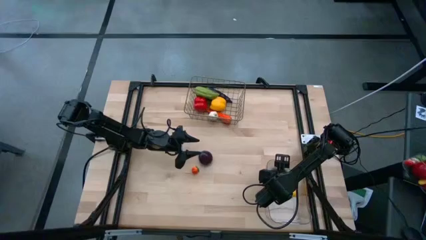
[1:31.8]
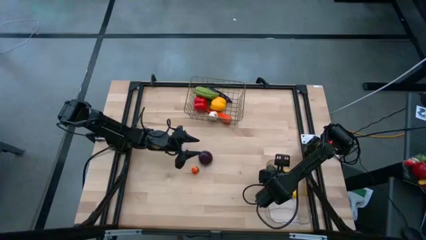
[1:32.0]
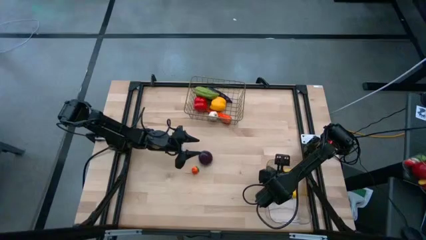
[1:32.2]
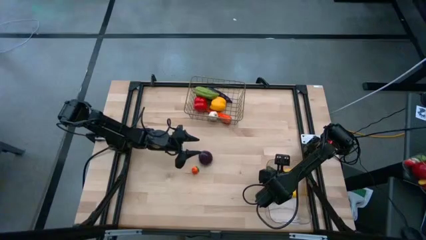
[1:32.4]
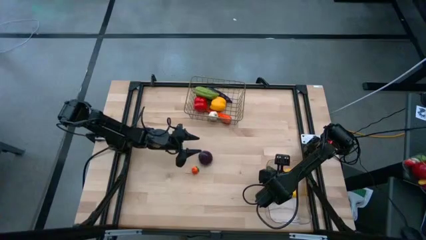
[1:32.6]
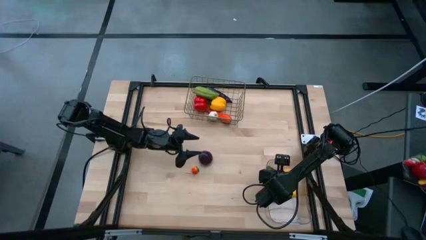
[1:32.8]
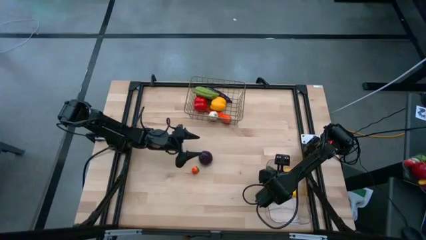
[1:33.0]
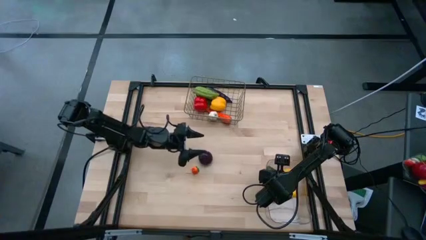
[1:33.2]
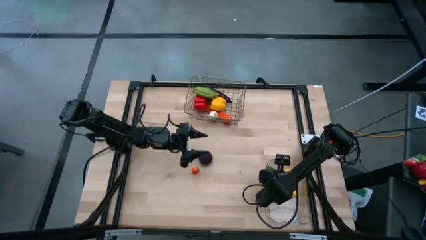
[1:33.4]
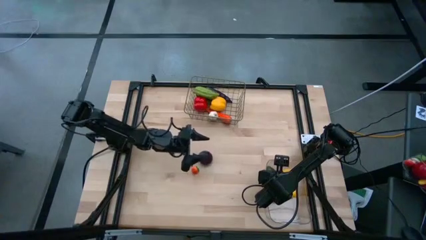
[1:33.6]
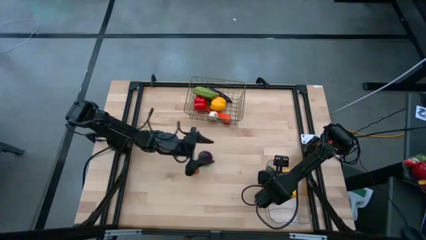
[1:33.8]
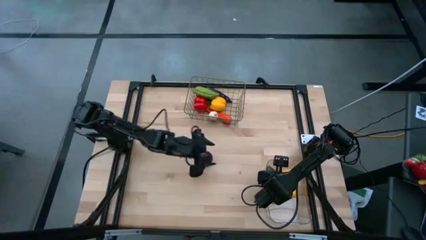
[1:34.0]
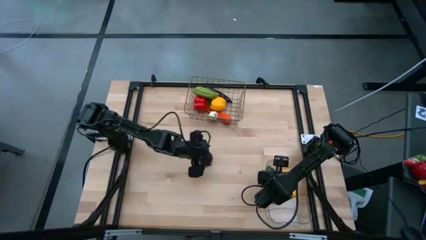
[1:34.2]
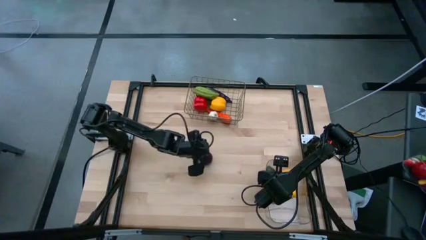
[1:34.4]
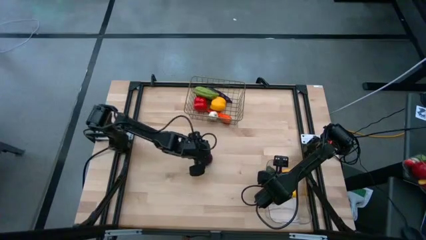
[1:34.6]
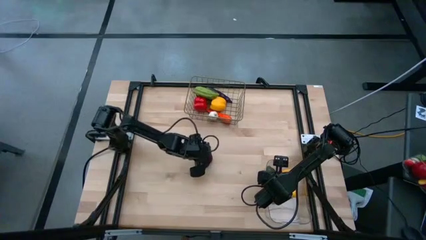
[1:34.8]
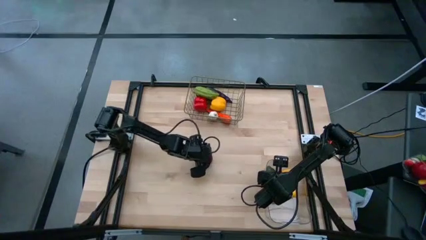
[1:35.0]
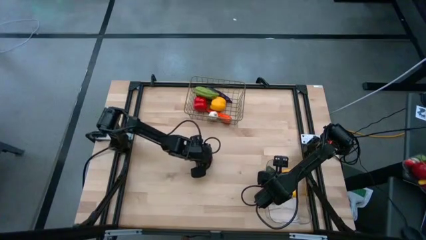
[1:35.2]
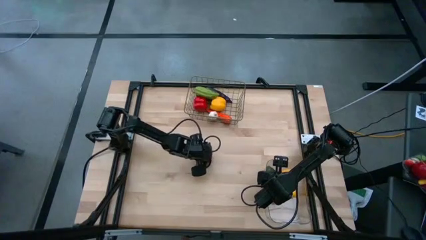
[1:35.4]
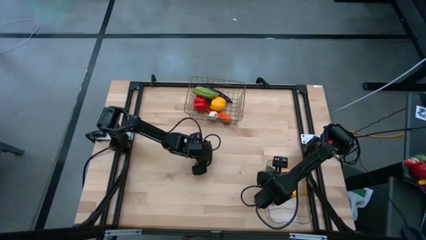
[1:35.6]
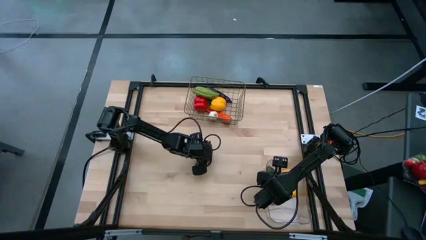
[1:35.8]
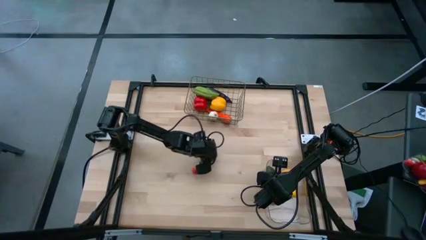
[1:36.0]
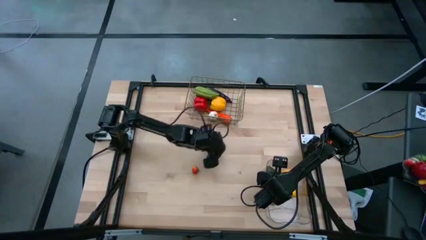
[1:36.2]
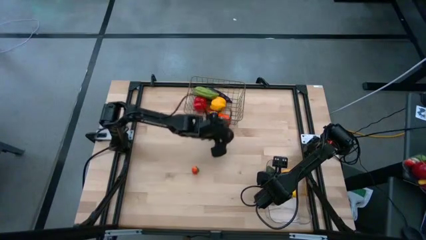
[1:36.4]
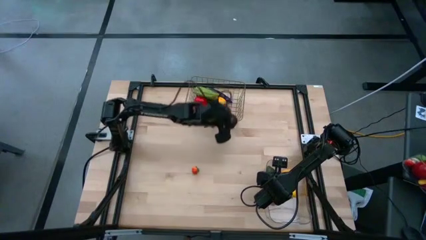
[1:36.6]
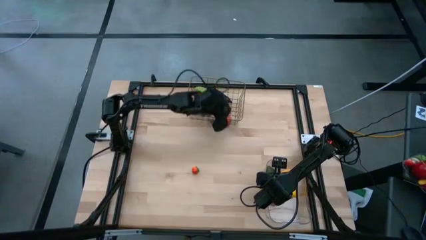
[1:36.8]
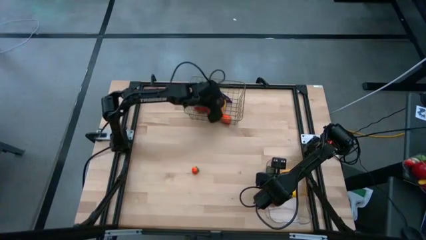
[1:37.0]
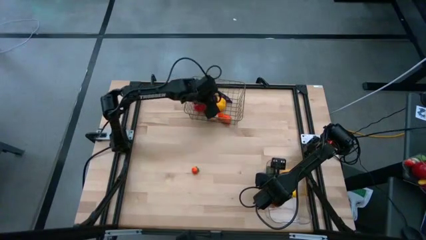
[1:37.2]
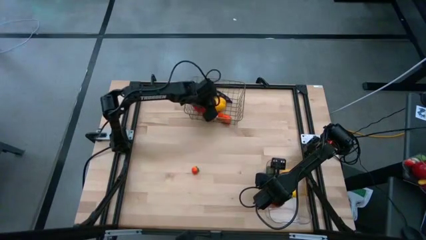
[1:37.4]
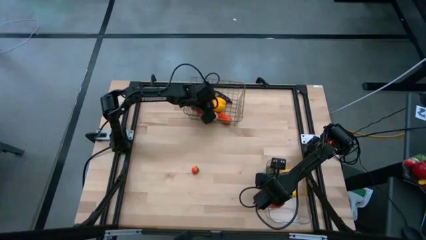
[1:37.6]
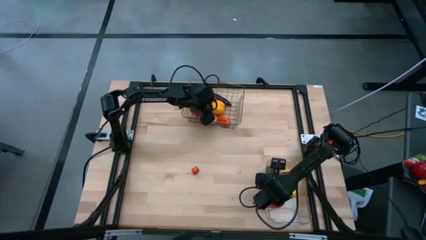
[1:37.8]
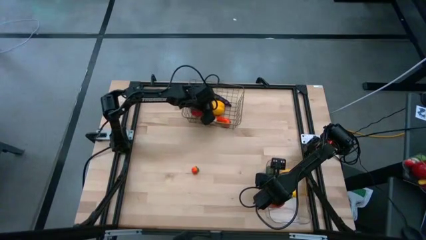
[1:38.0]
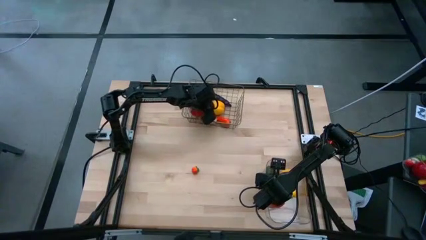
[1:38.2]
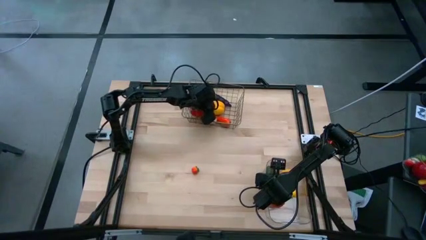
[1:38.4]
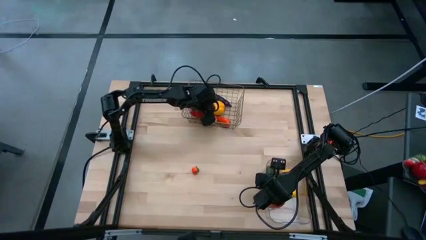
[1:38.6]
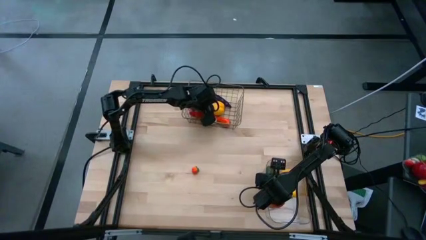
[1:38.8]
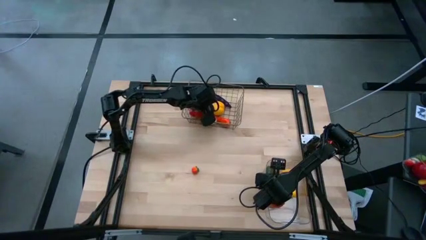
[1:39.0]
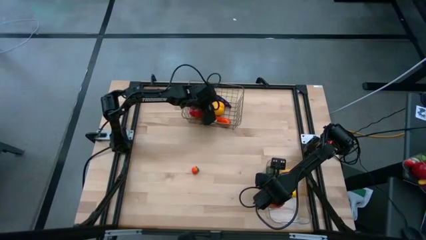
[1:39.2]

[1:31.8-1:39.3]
Task: Sort produce into baskets
Put the purple plum into the wire basket

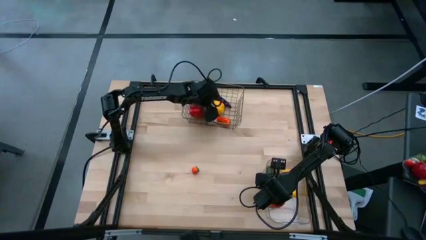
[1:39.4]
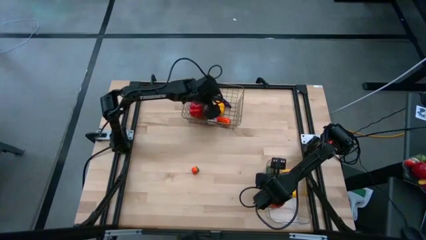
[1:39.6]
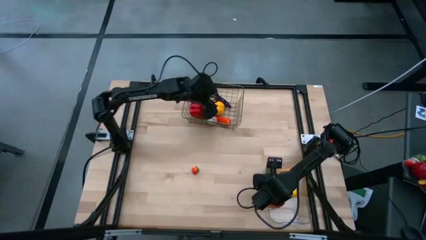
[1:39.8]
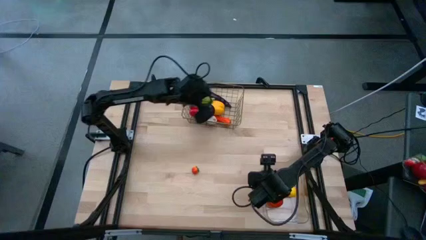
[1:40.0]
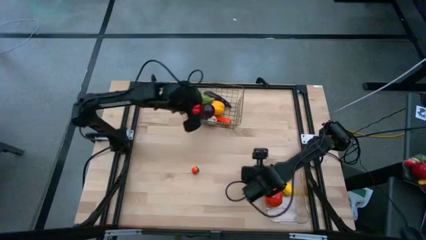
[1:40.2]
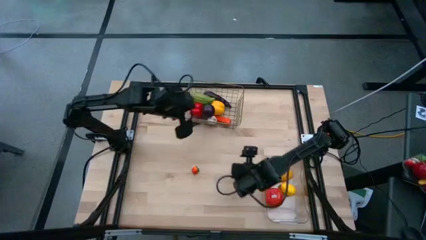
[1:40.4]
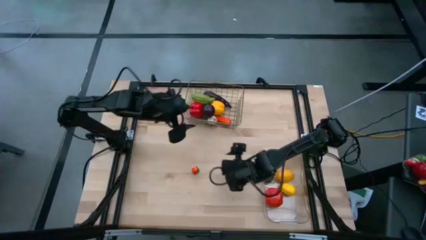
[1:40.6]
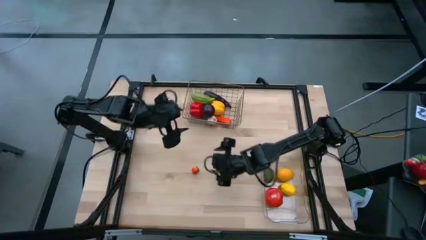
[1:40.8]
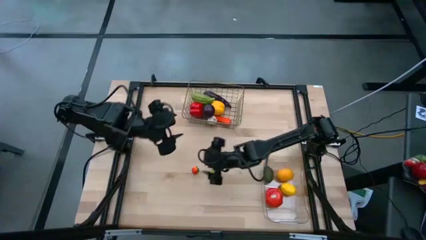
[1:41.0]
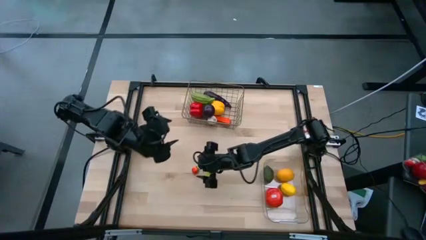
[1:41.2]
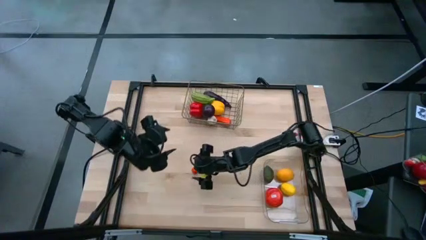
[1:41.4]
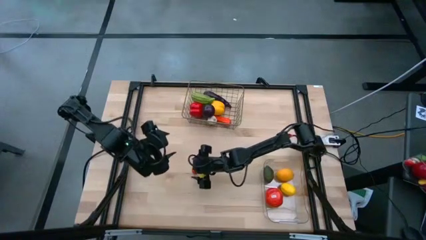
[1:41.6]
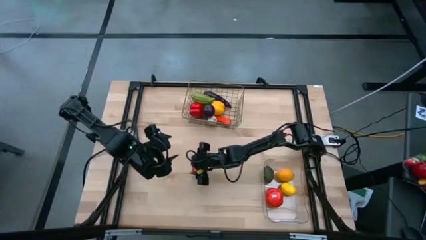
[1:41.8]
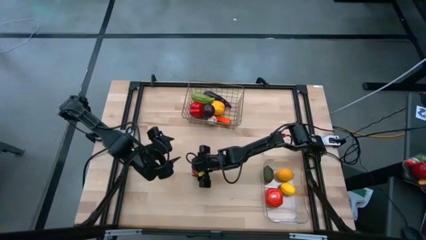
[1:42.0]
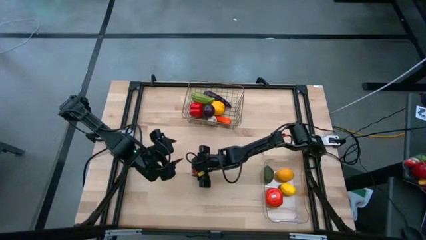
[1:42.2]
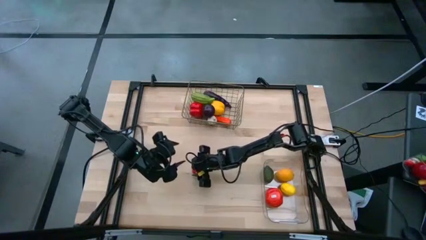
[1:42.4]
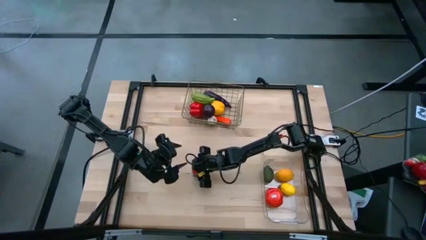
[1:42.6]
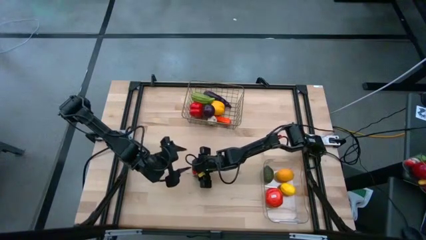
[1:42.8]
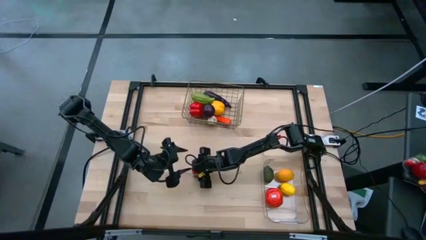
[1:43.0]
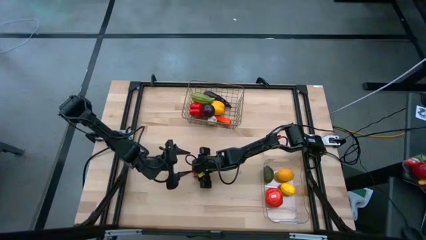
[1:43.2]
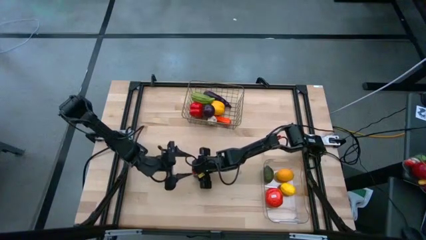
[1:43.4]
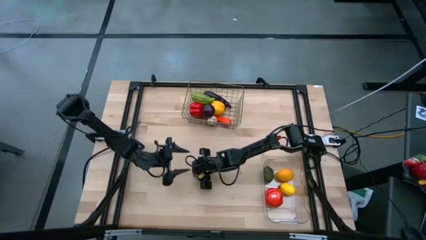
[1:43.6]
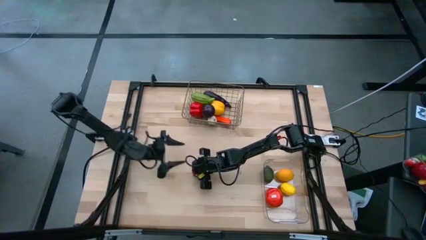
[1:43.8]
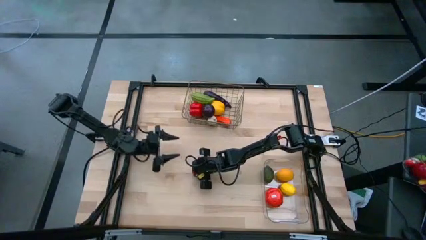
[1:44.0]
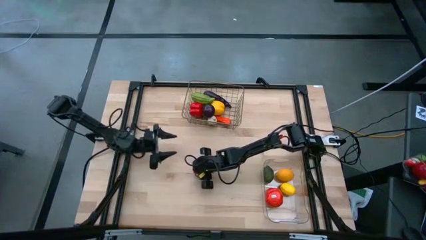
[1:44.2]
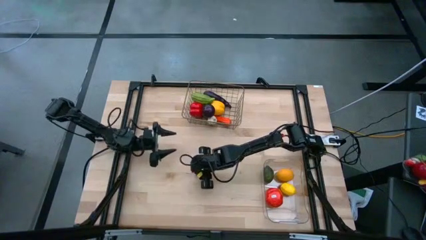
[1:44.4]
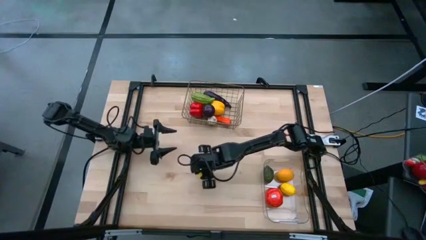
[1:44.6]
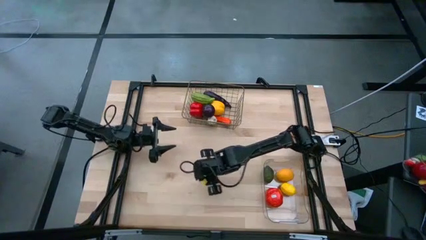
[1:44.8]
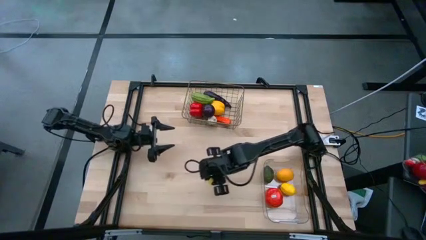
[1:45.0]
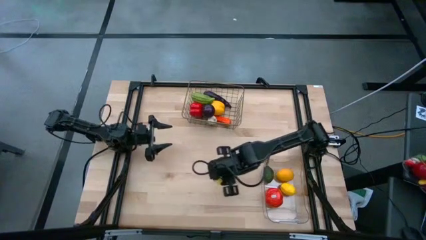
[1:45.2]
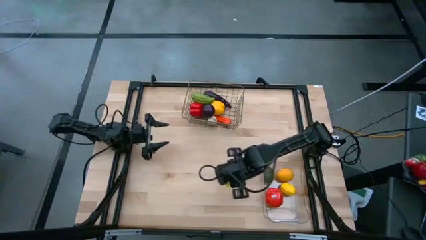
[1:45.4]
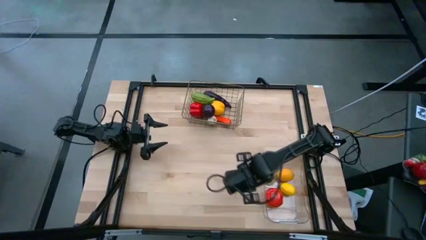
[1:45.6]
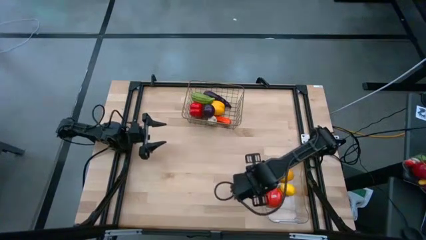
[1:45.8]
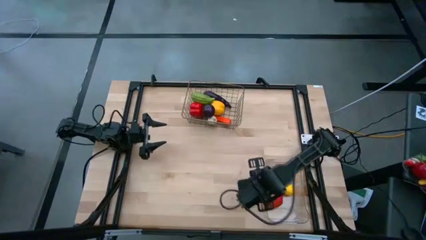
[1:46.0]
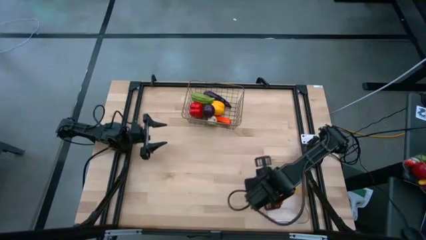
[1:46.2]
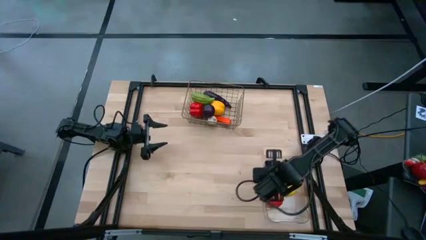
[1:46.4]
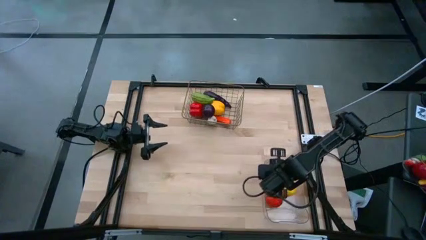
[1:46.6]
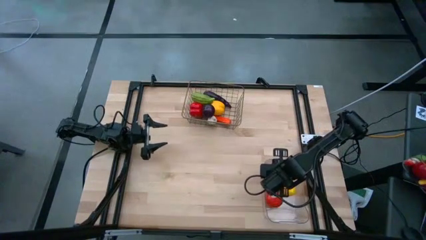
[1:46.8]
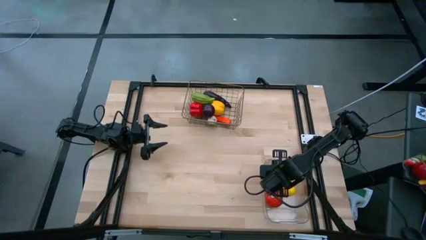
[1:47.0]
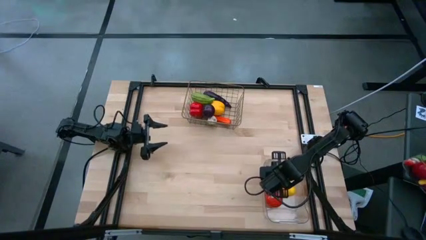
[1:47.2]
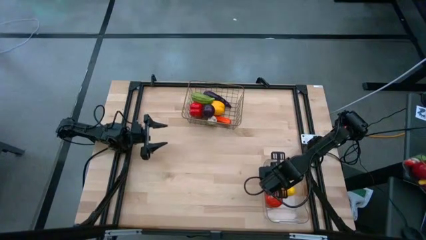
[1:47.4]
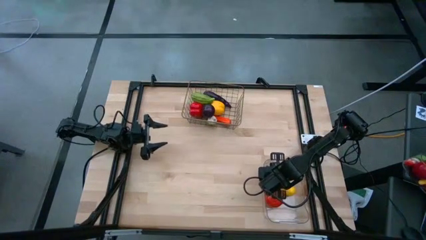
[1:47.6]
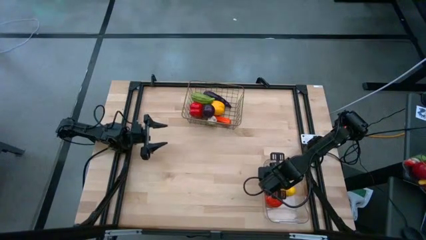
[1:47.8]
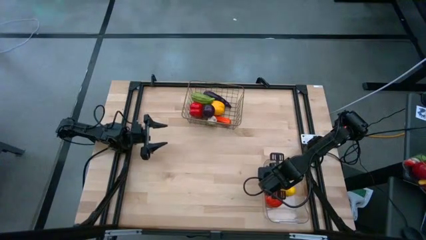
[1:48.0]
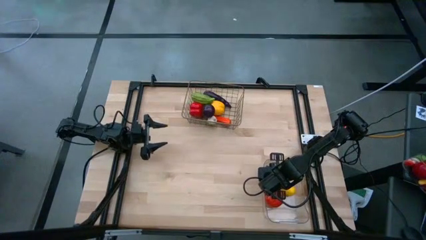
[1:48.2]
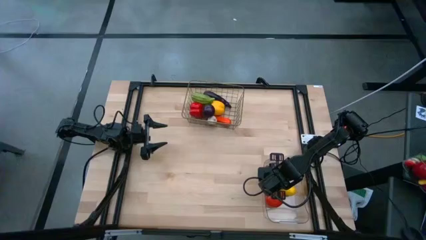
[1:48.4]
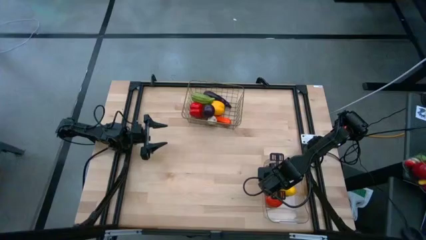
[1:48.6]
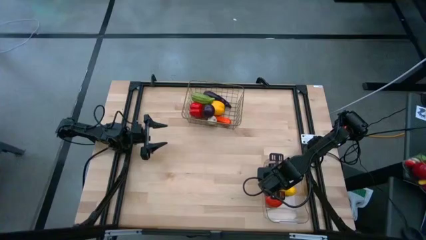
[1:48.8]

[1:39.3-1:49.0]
Put the orange tomato into the transparent bin
